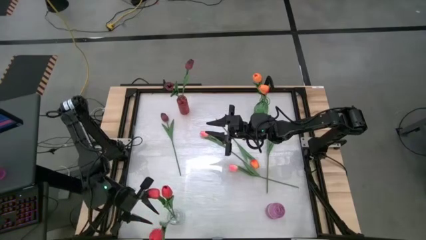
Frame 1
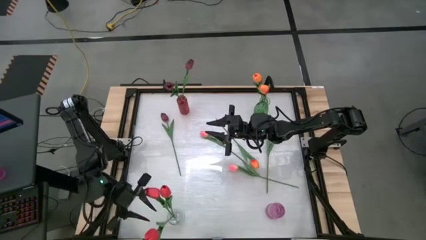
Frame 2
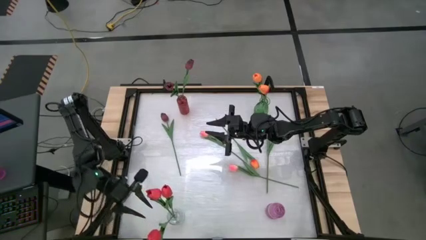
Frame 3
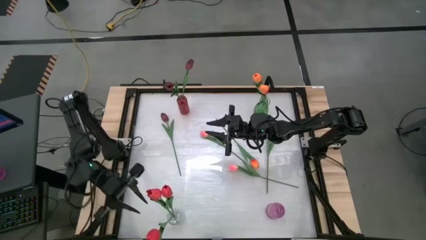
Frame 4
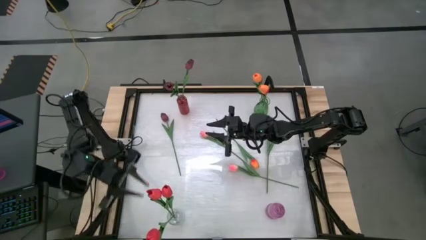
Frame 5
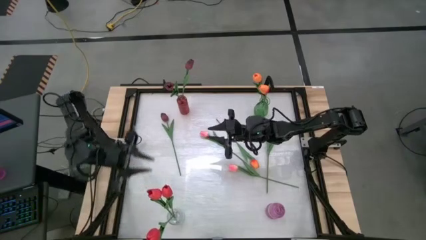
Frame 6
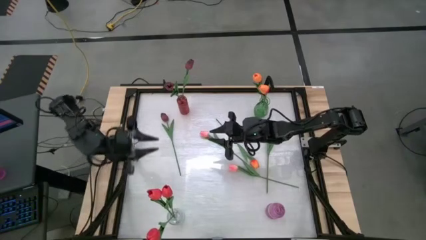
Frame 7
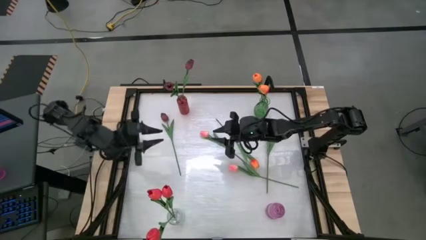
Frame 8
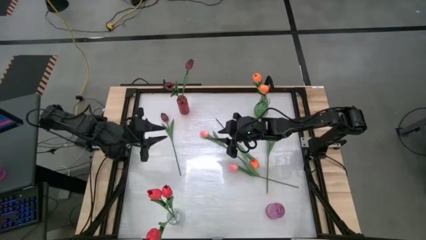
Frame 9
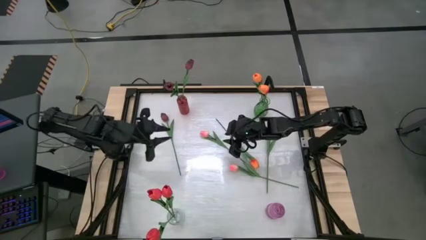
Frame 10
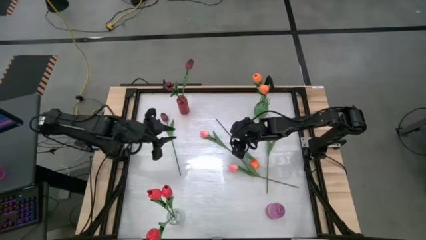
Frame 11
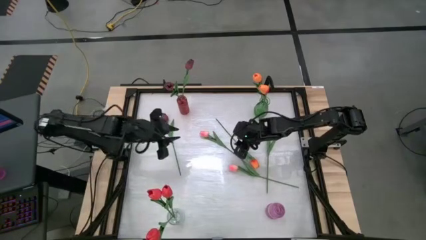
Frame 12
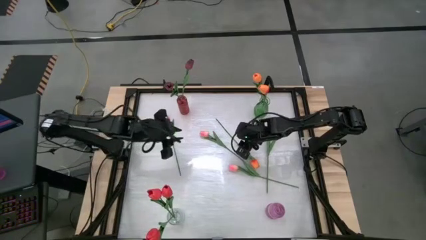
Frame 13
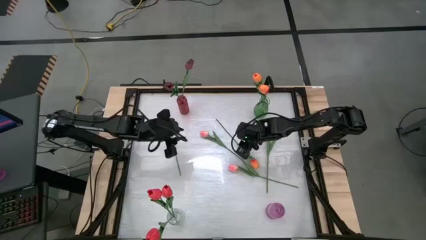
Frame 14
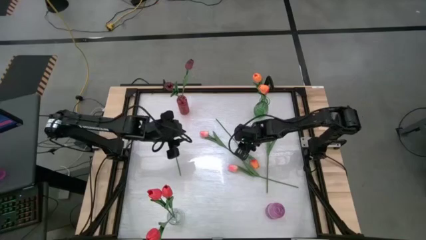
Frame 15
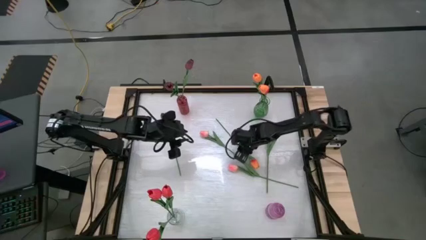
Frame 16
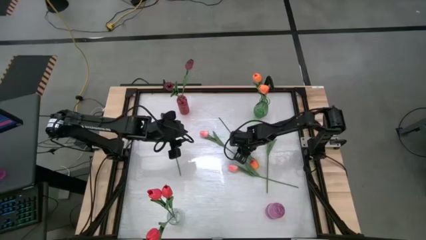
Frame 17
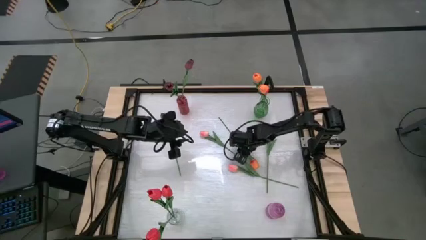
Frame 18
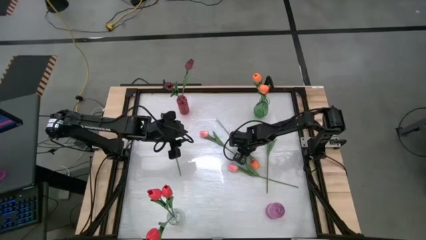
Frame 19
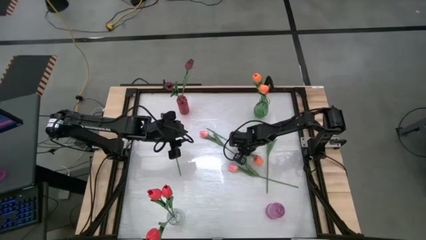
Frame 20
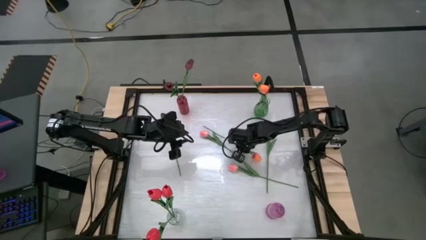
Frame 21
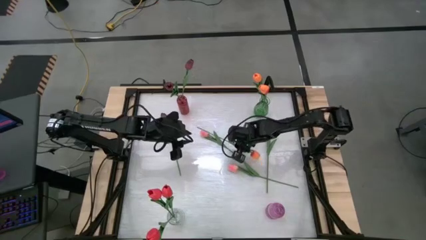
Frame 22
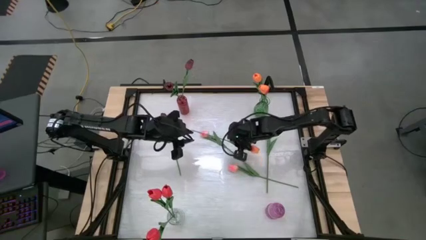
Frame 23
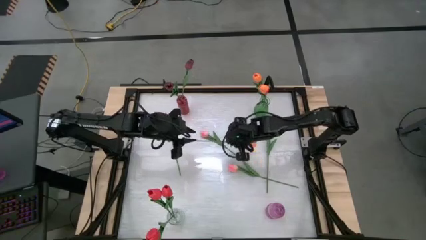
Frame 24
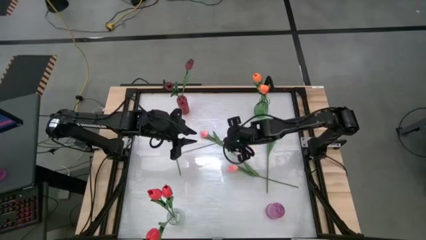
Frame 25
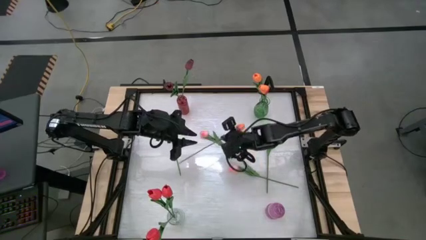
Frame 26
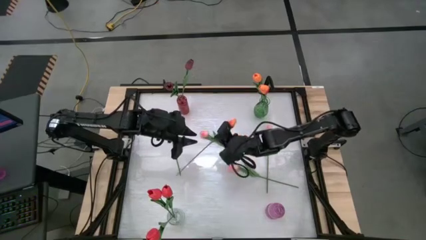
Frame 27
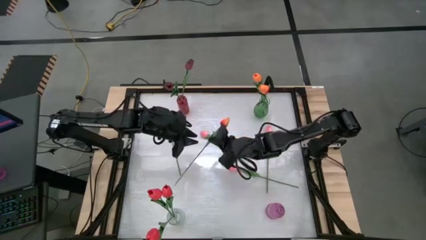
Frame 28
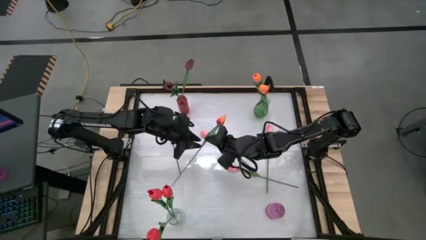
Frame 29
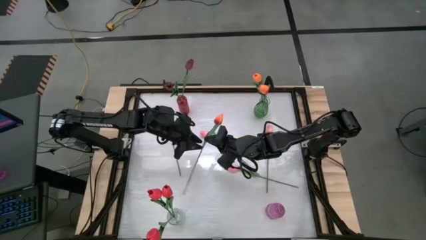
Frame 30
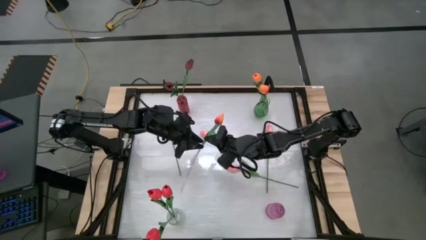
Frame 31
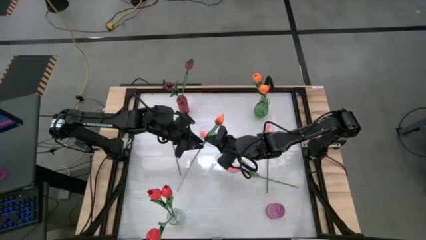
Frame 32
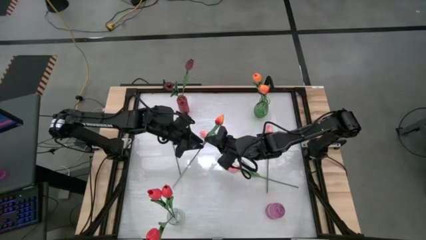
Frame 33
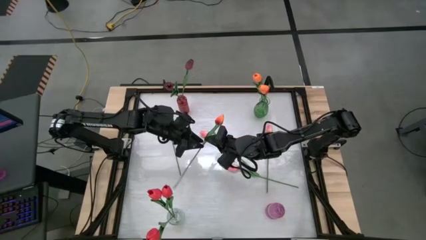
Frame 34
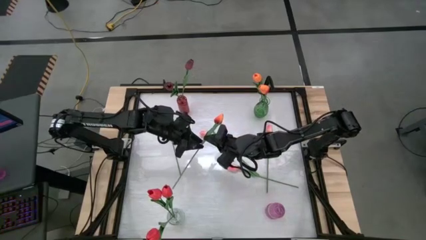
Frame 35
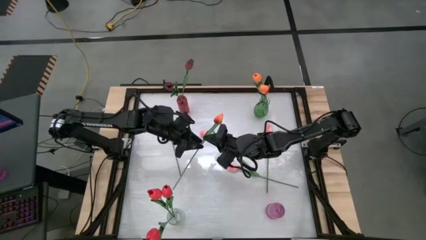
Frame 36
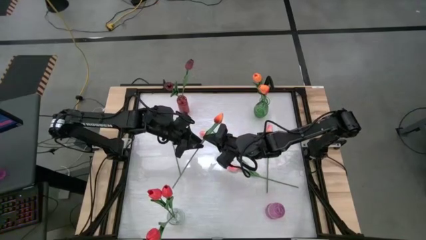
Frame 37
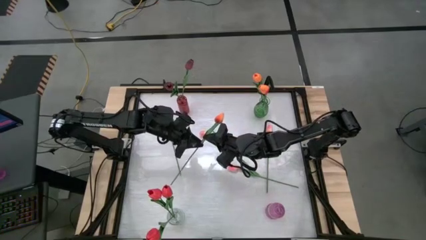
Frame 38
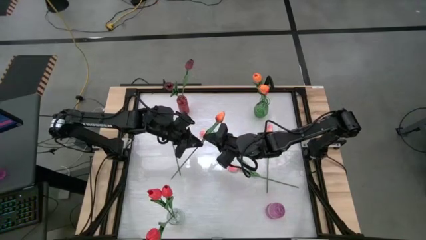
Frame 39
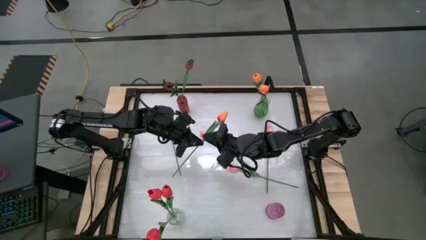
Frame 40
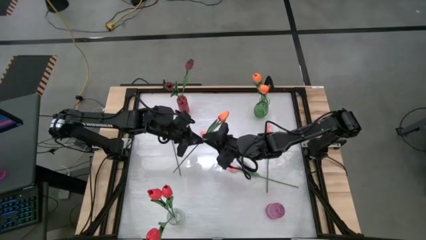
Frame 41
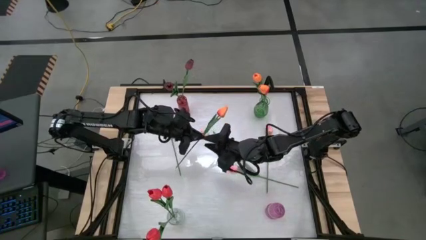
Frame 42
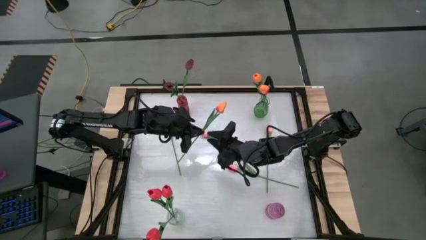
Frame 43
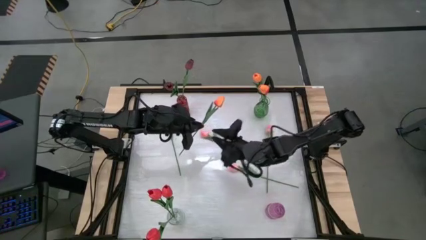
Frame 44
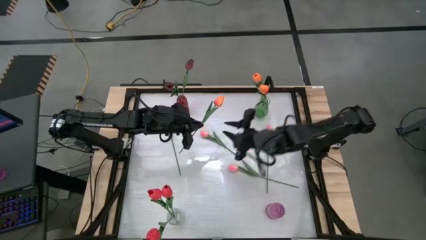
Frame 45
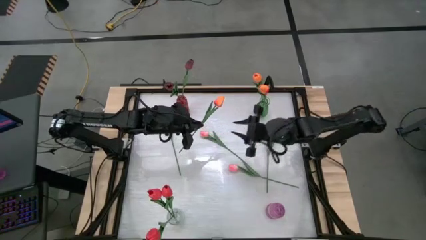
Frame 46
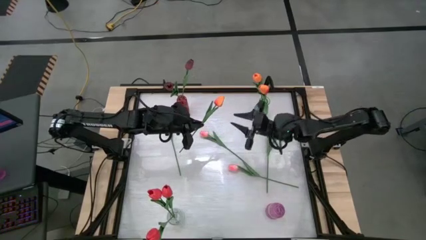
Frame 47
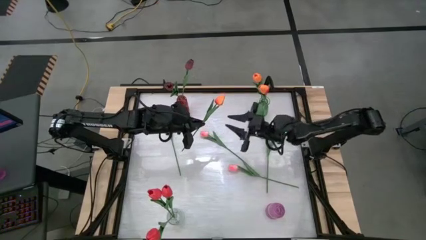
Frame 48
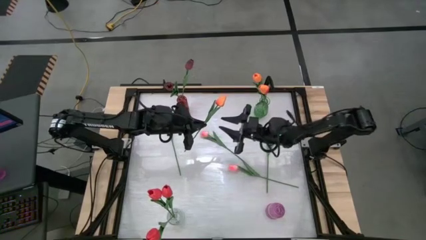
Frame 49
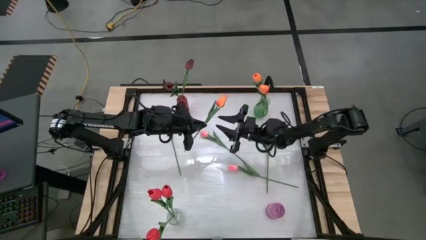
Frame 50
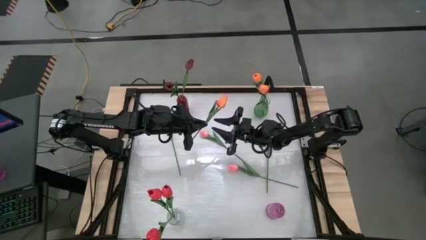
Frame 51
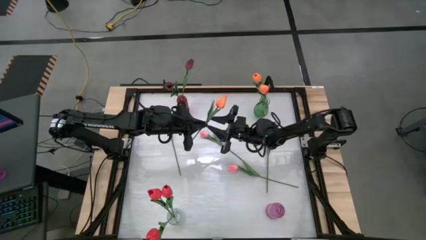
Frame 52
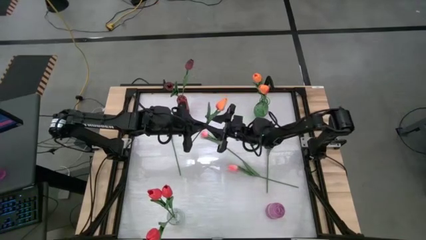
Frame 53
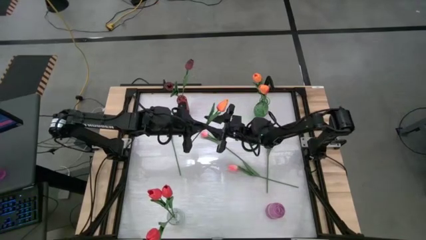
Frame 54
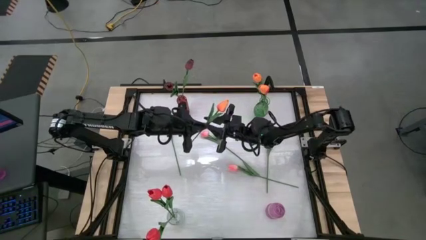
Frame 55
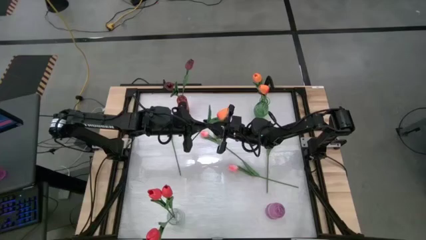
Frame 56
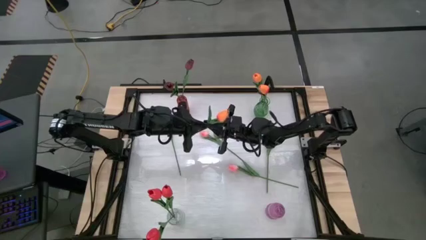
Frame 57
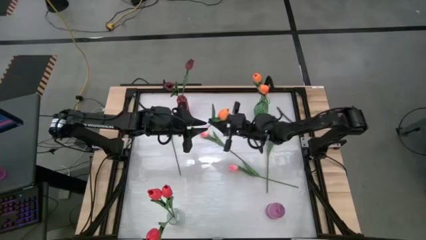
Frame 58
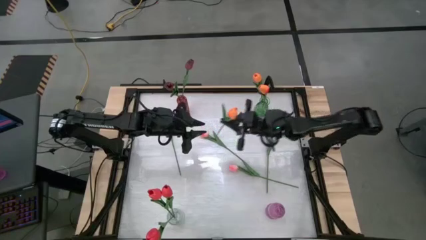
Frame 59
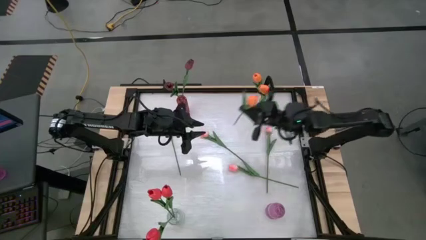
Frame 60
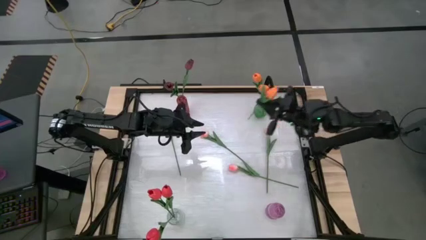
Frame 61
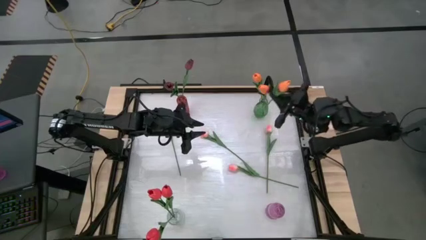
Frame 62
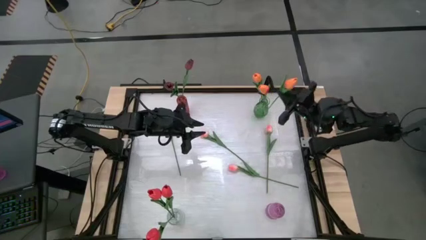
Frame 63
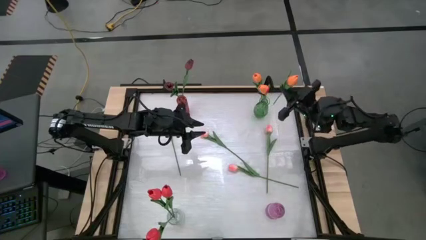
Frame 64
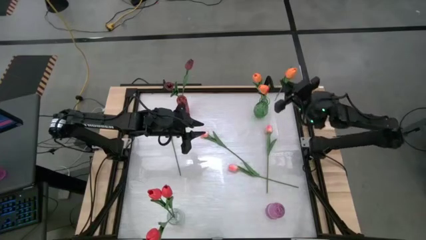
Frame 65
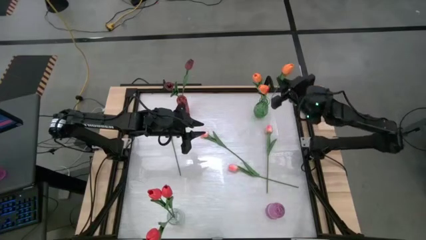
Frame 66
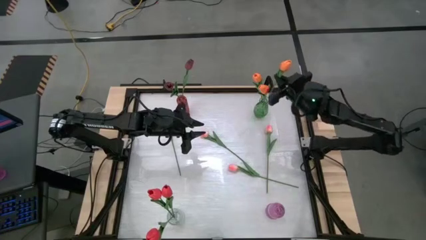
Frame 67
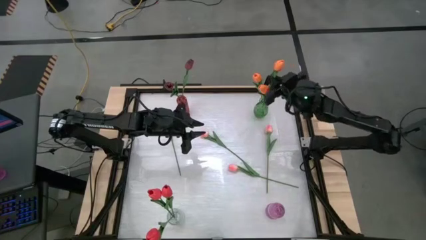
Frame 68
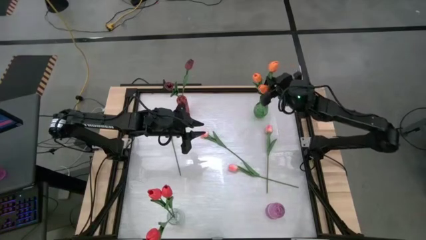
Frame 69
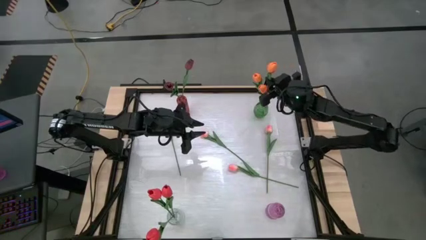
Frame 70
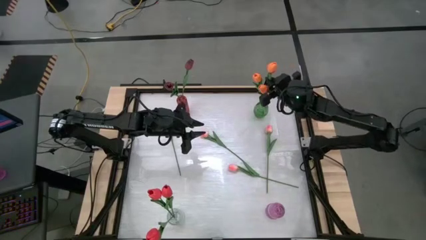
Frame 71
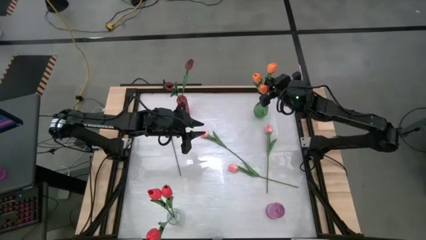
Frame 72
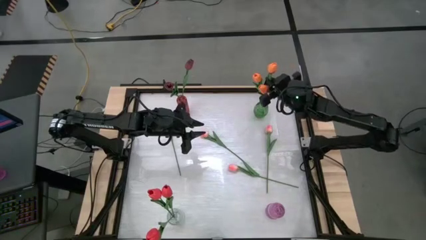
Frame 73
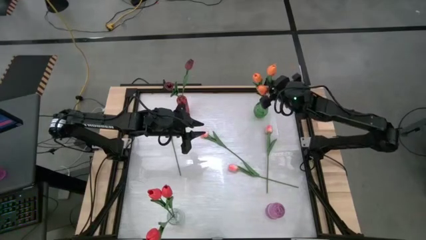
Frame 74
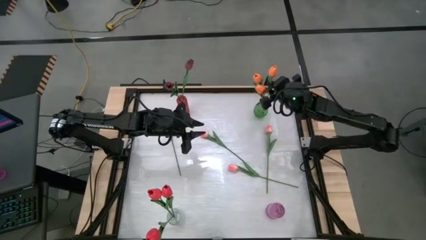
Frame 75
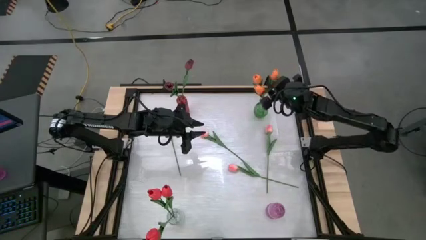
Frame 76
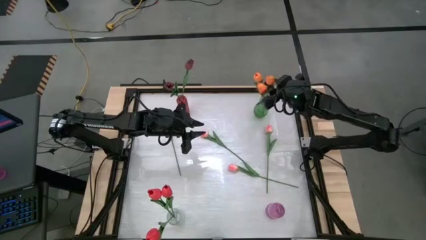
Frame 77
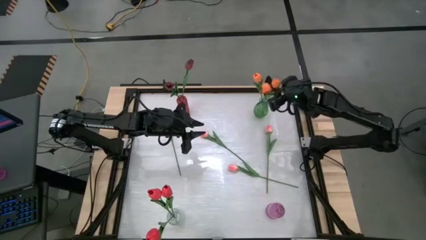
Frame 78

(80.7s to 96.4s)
Task: Sort flowers into vase by color
Put the orange flower into the green vase
